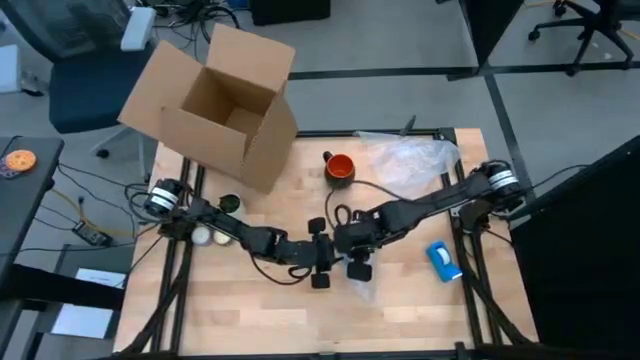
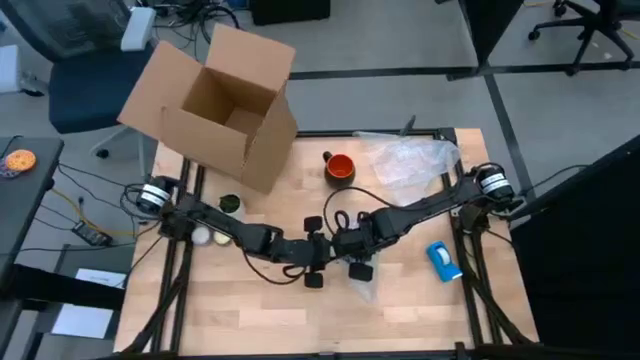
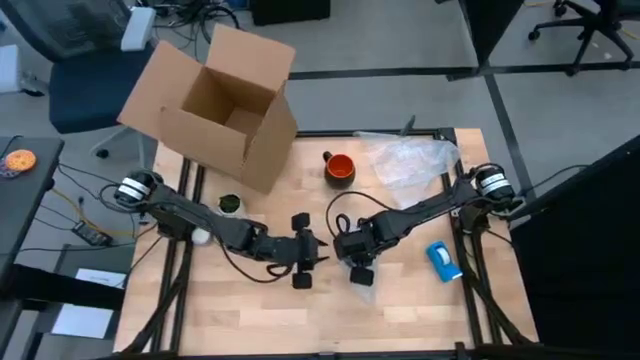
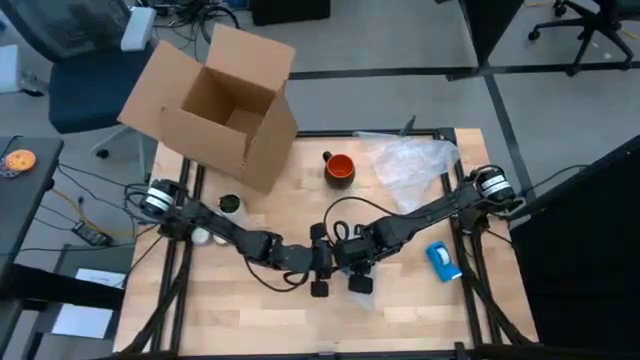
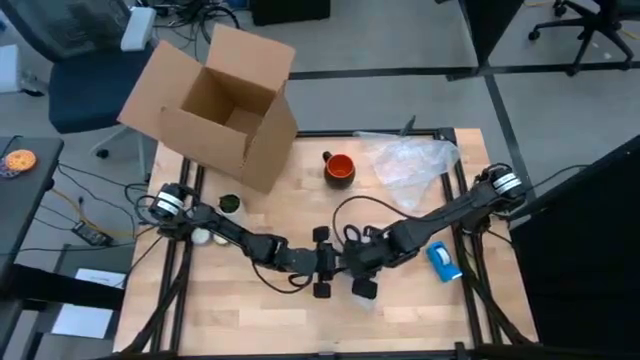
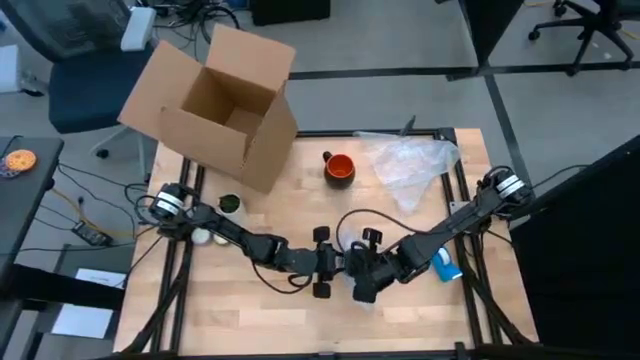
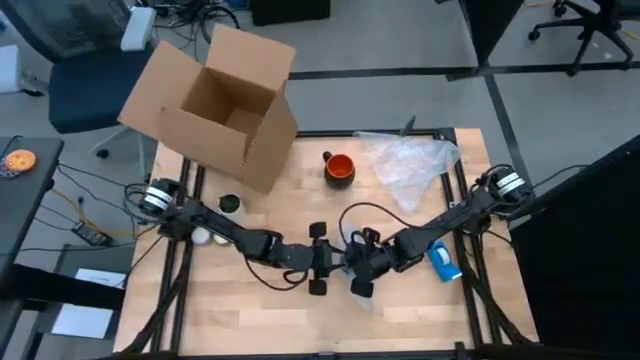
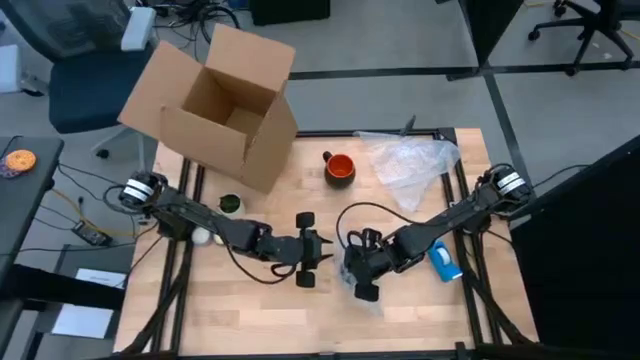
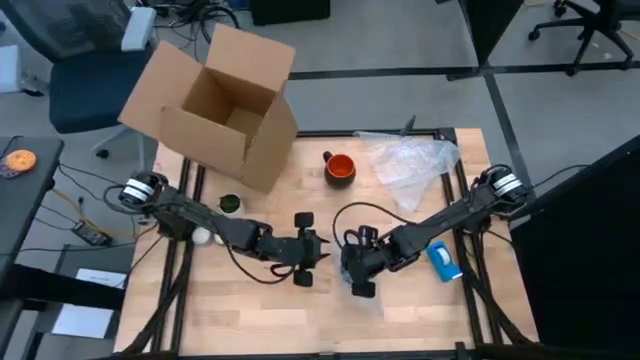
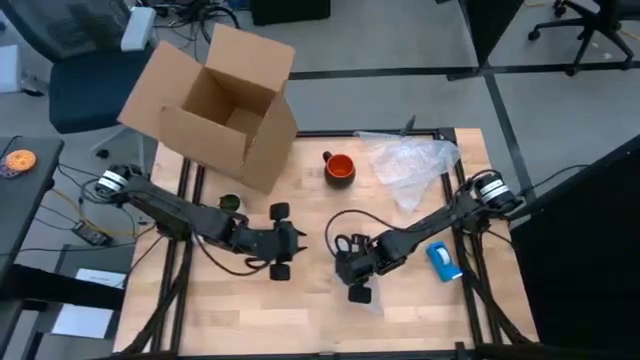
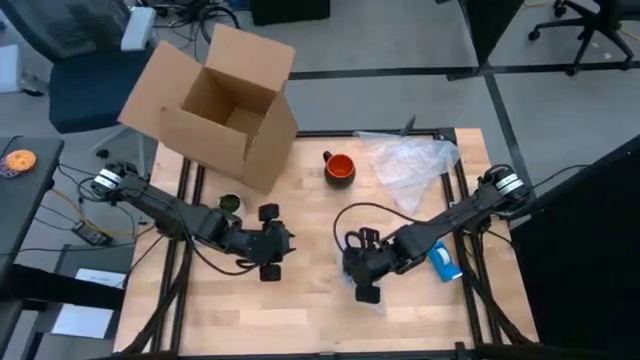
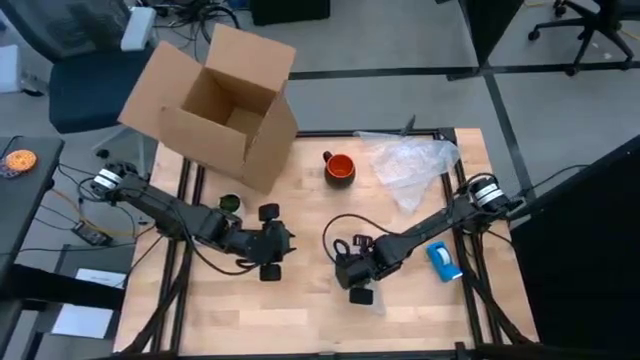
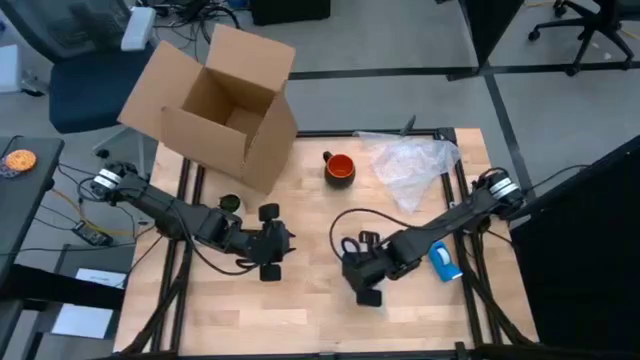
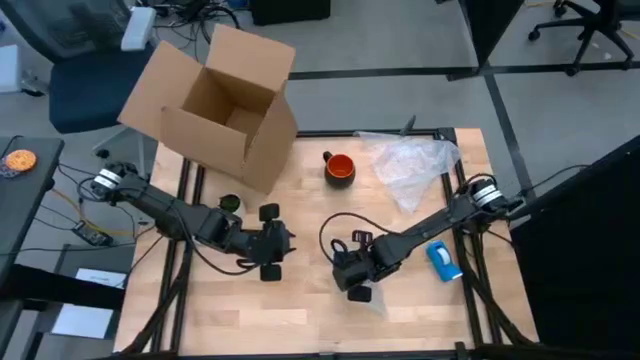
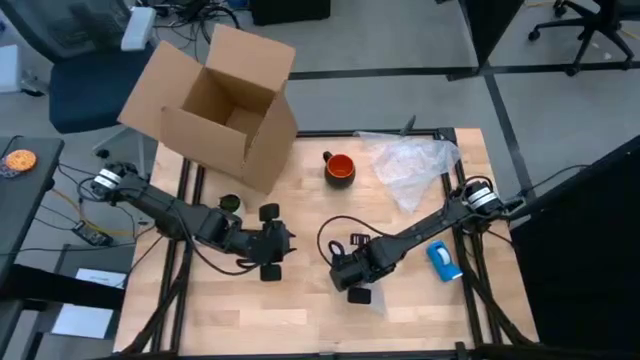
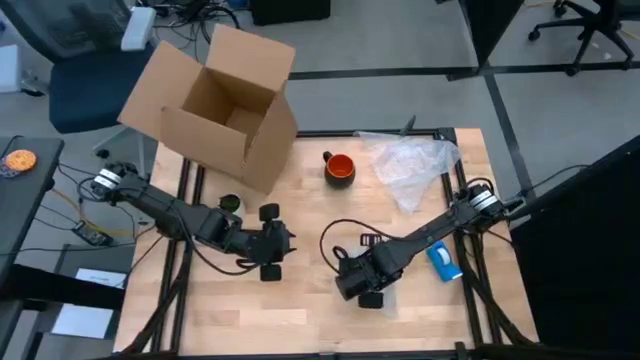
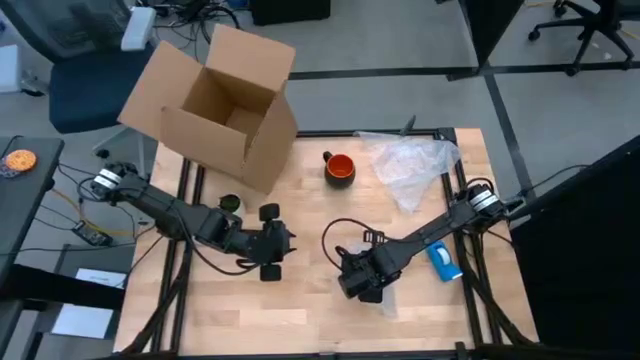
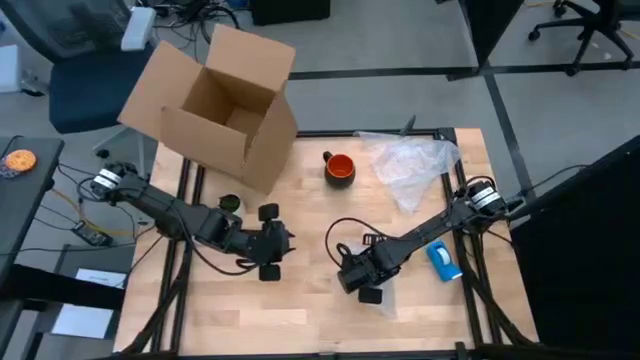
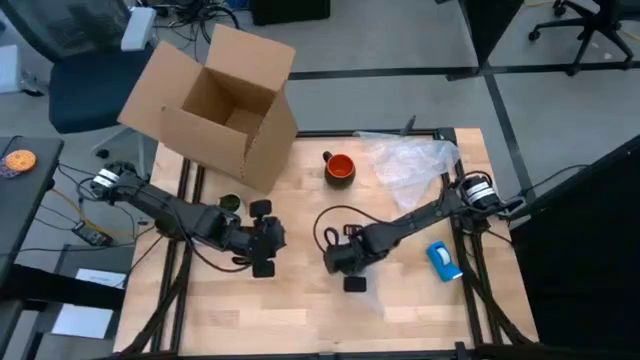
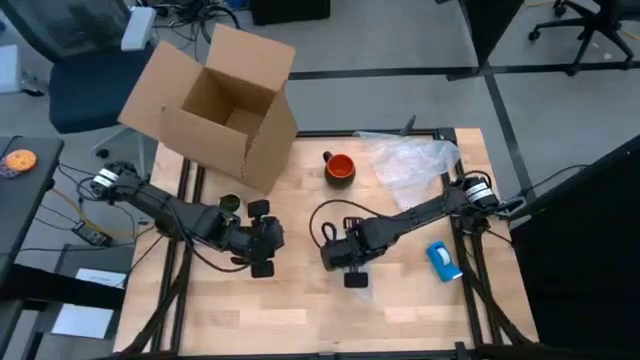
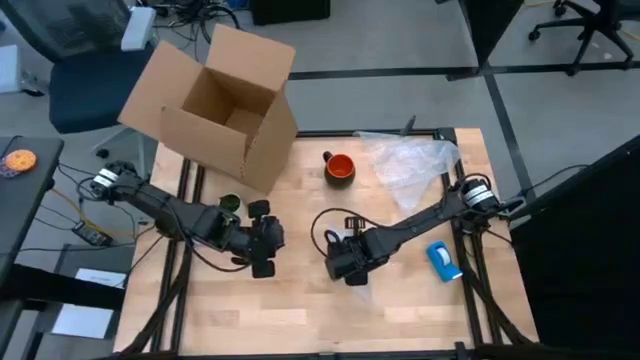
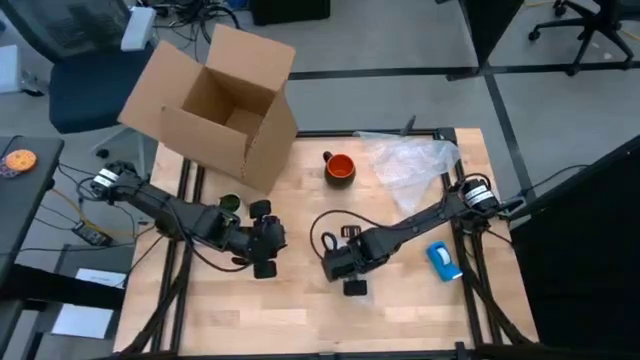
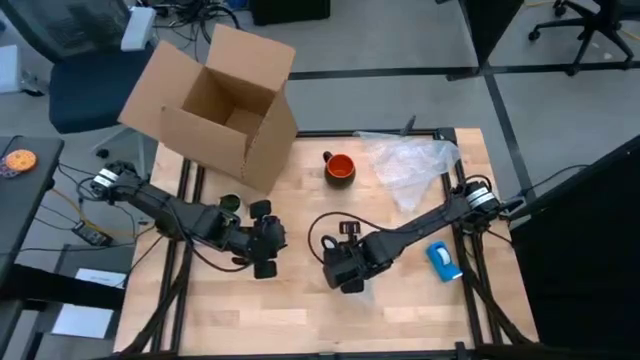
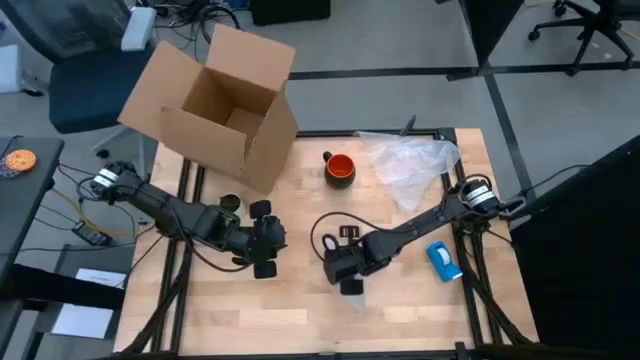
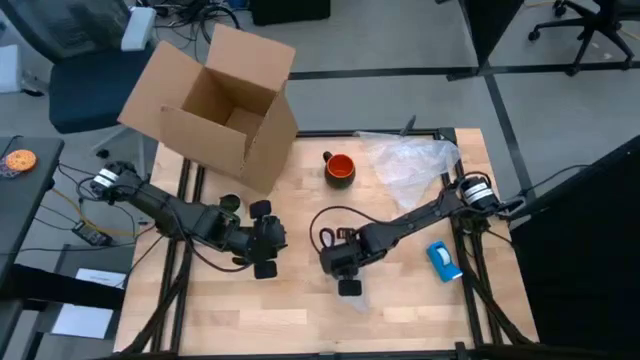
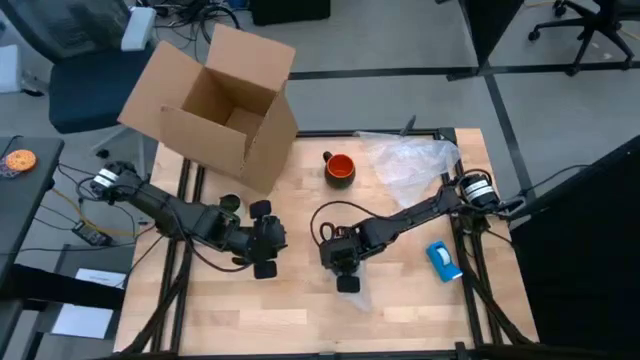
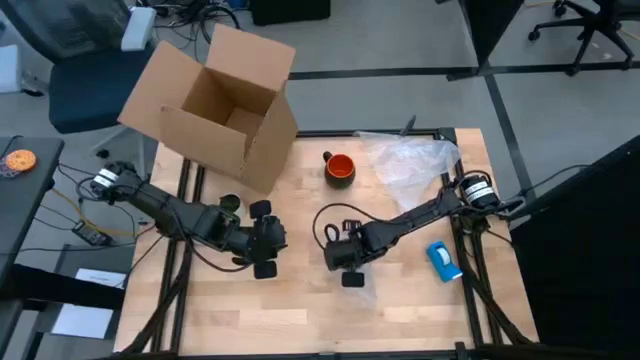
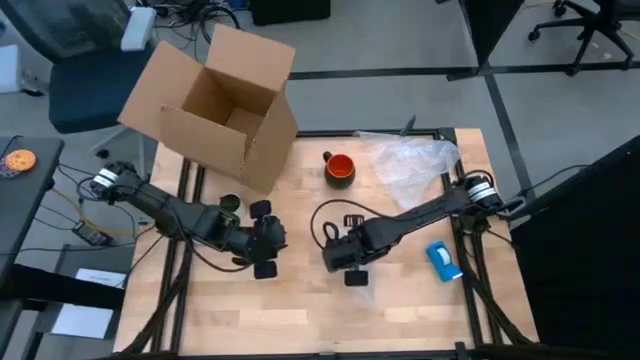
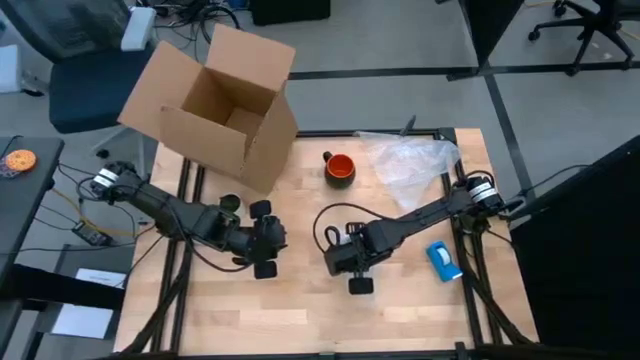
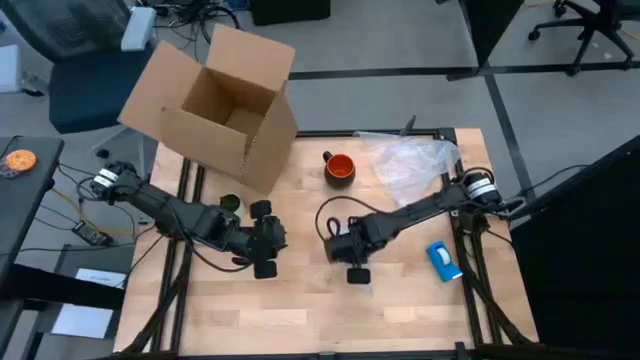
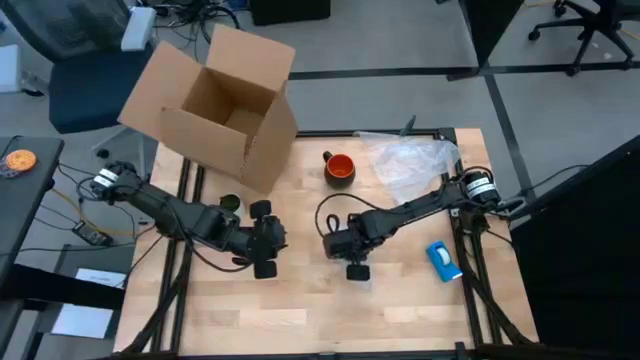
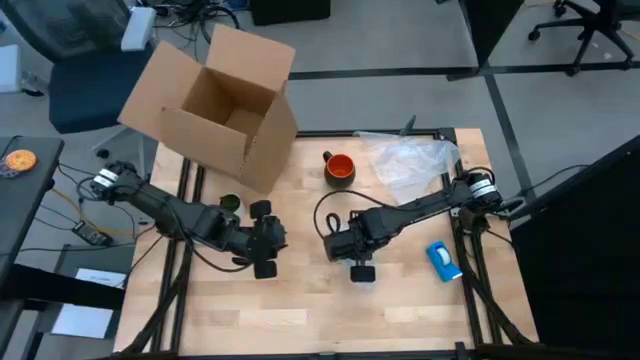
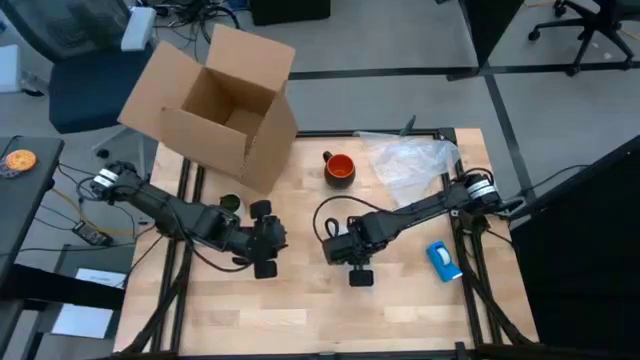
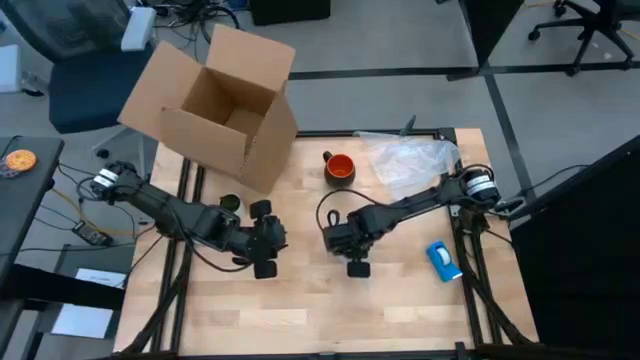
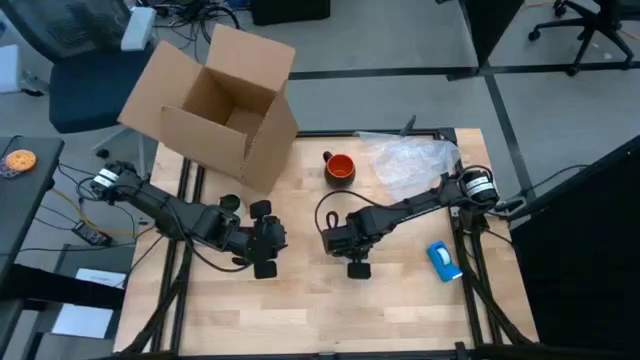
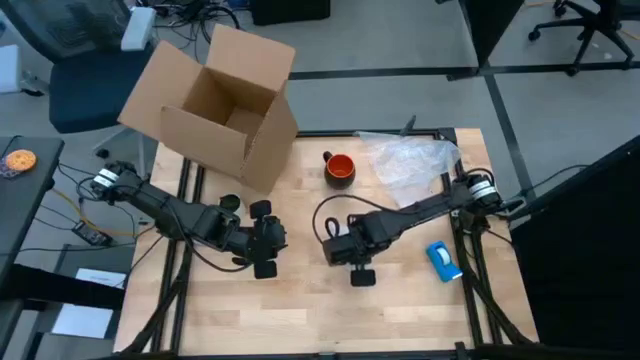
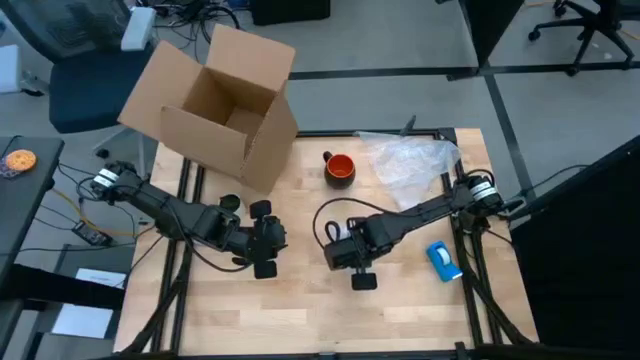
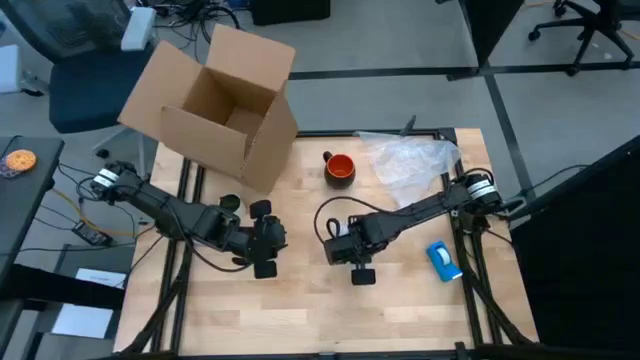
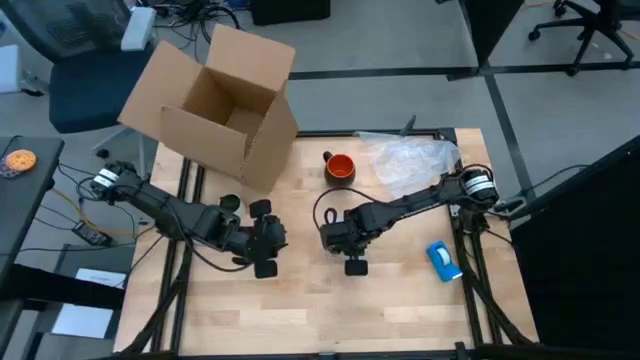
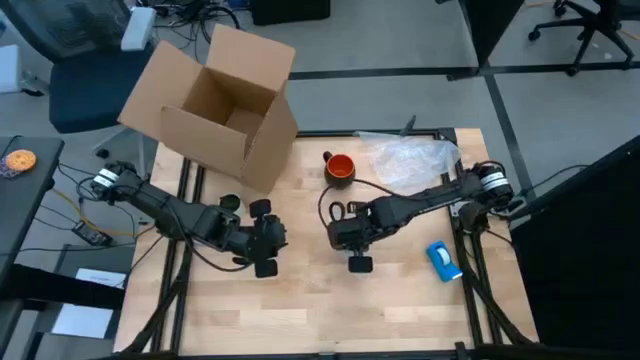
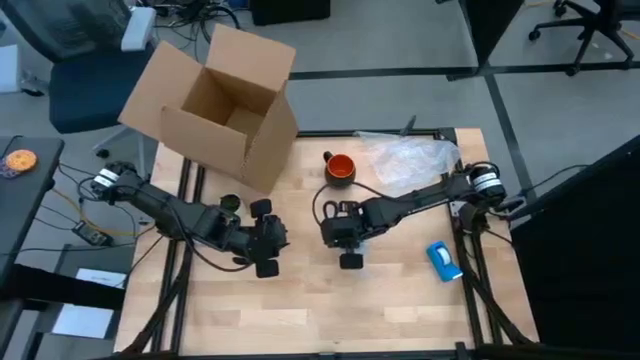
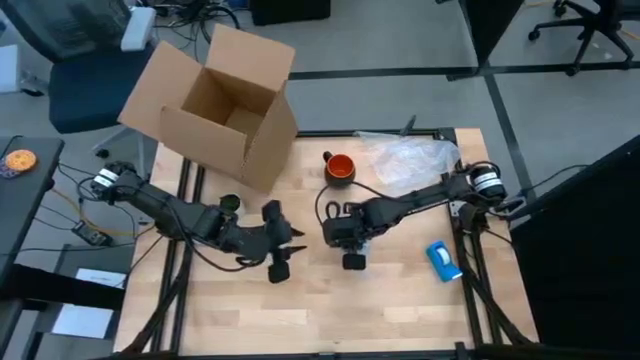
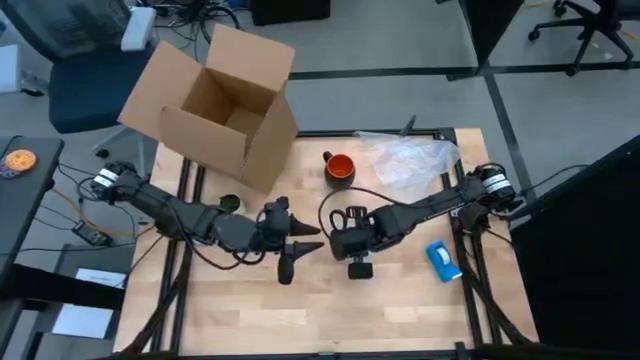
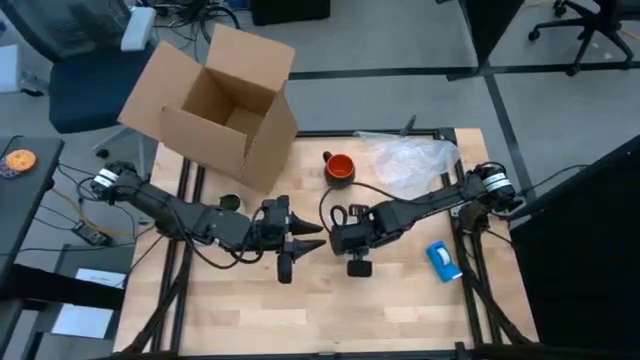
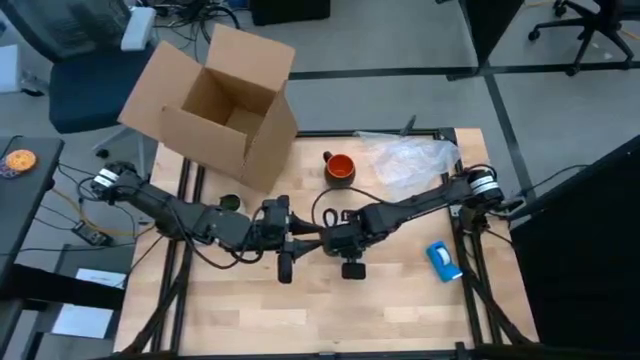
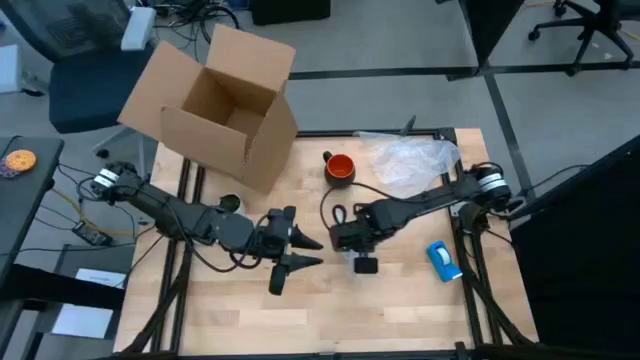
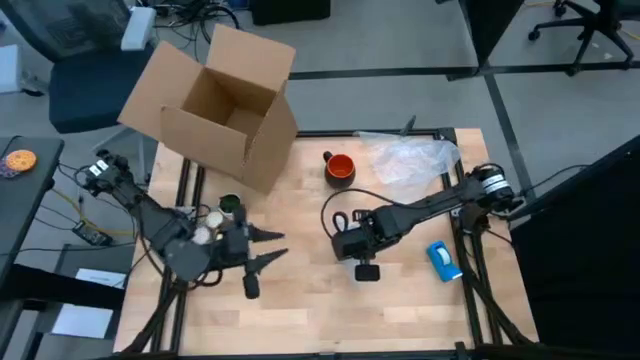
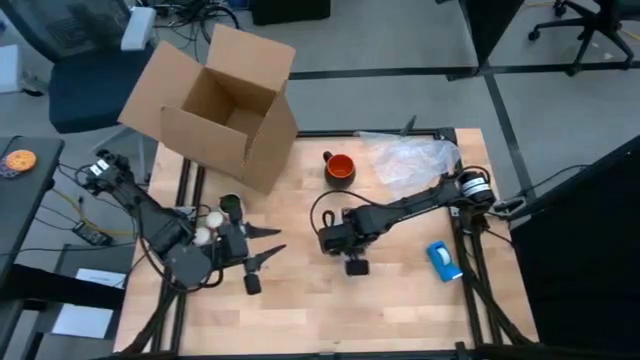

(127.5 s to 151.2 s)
Task: wrap mug
Wrap the blue mug with bubble wrap
